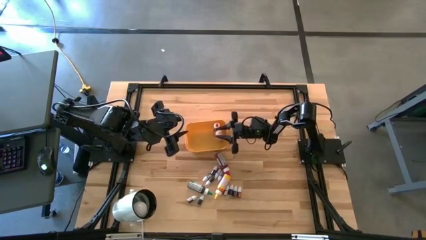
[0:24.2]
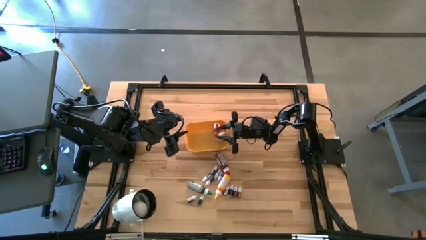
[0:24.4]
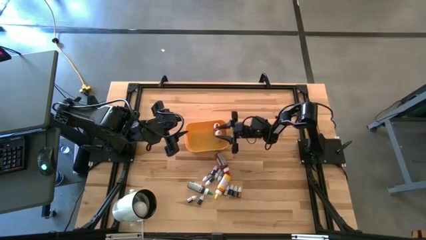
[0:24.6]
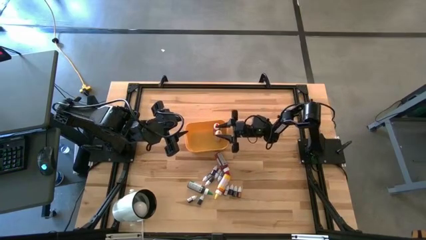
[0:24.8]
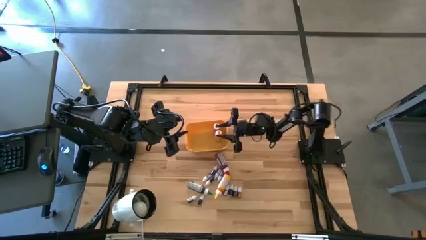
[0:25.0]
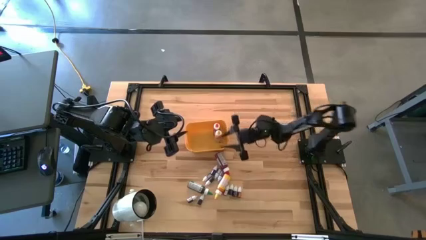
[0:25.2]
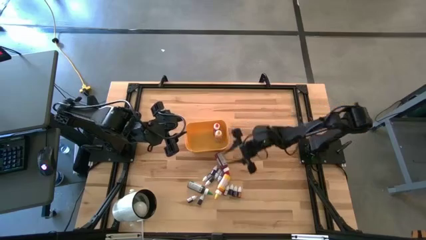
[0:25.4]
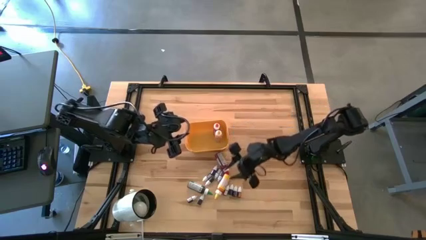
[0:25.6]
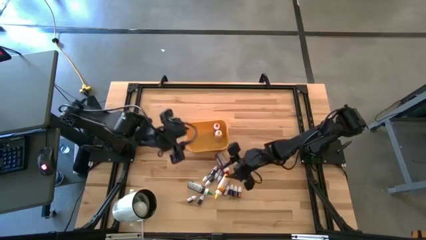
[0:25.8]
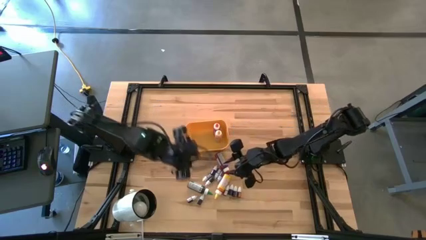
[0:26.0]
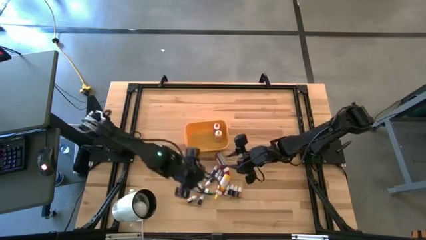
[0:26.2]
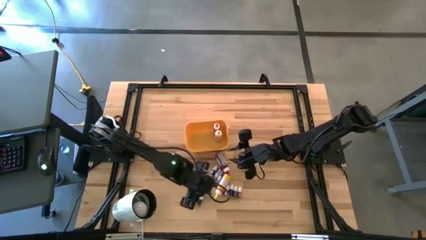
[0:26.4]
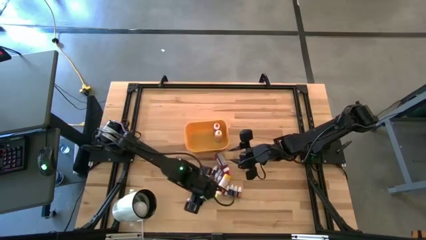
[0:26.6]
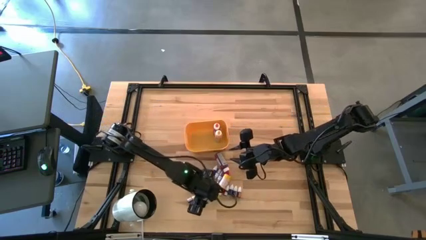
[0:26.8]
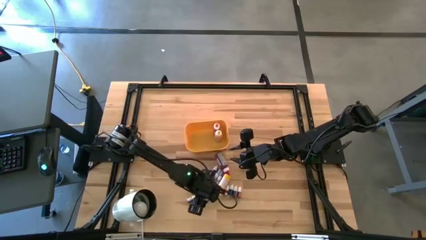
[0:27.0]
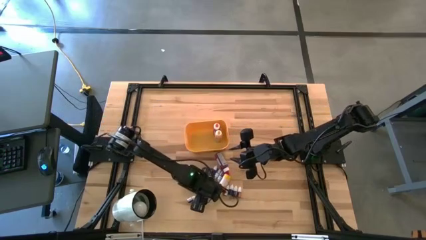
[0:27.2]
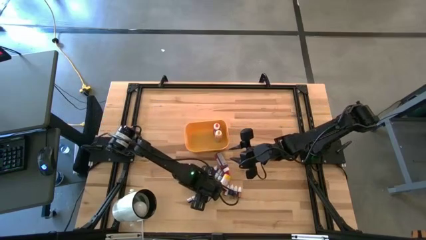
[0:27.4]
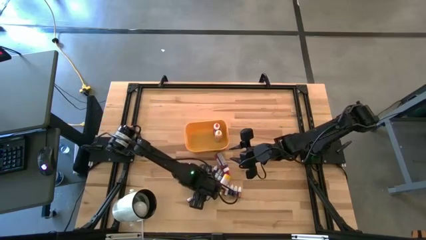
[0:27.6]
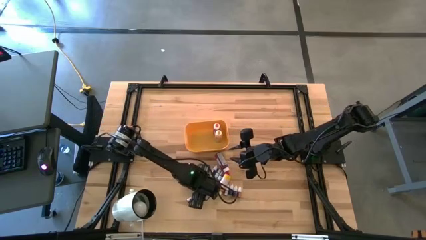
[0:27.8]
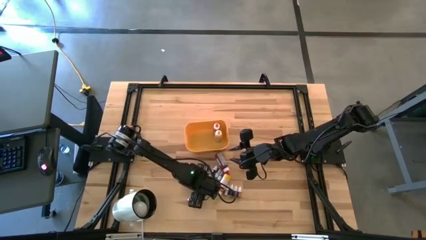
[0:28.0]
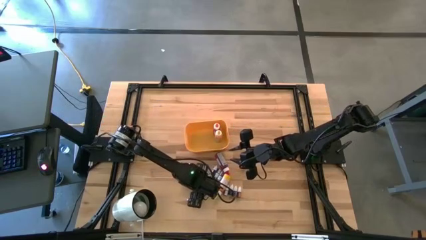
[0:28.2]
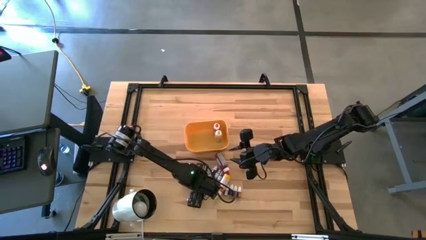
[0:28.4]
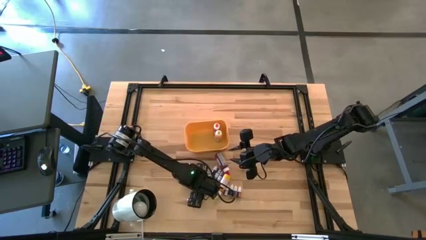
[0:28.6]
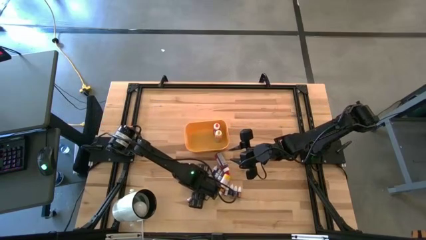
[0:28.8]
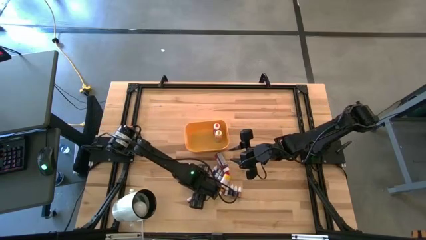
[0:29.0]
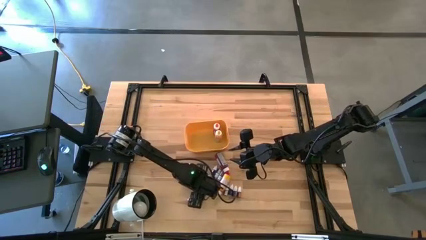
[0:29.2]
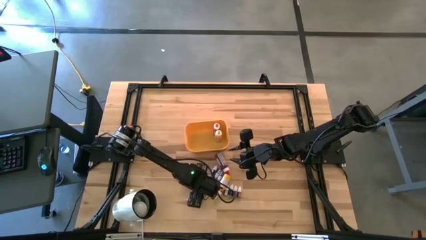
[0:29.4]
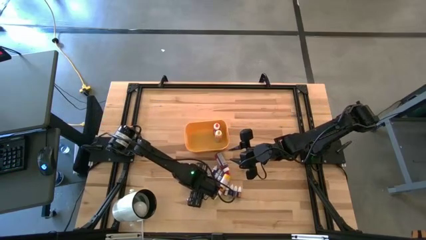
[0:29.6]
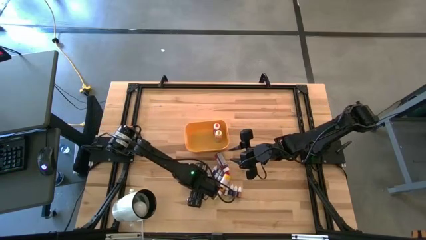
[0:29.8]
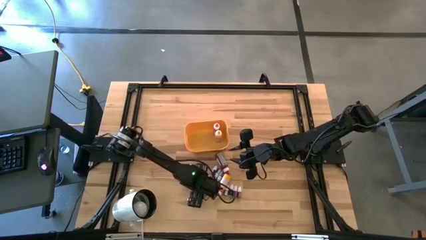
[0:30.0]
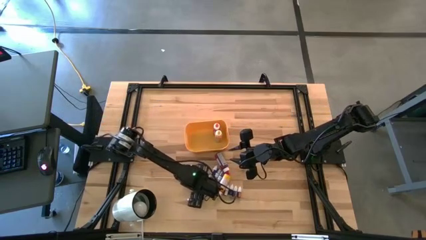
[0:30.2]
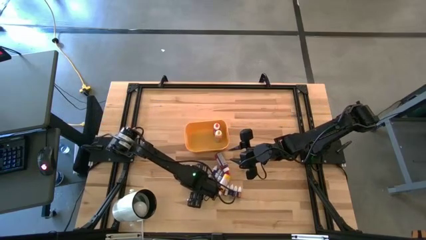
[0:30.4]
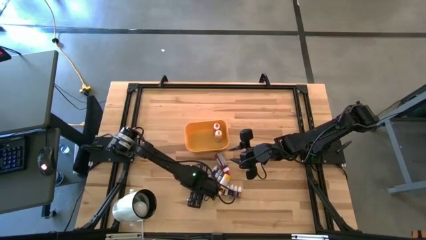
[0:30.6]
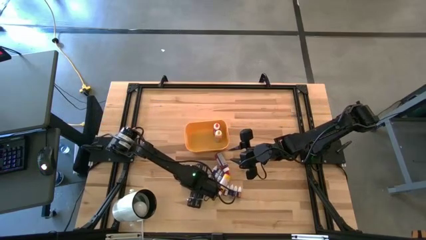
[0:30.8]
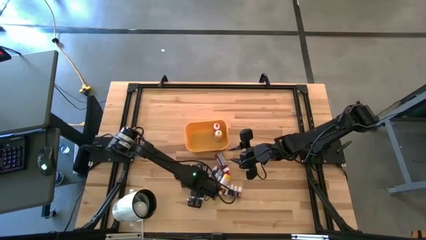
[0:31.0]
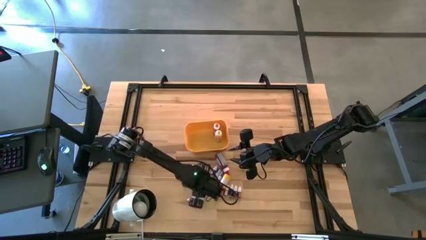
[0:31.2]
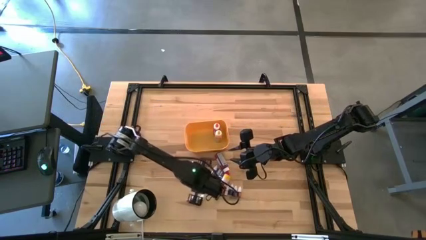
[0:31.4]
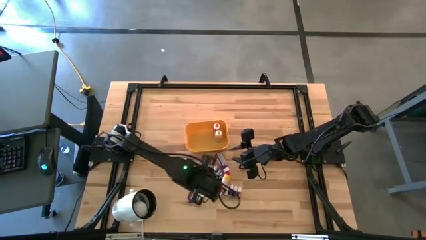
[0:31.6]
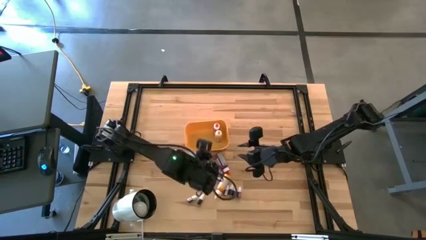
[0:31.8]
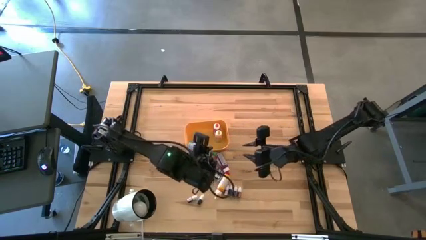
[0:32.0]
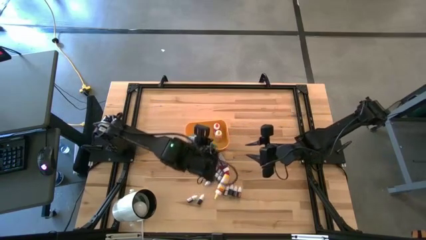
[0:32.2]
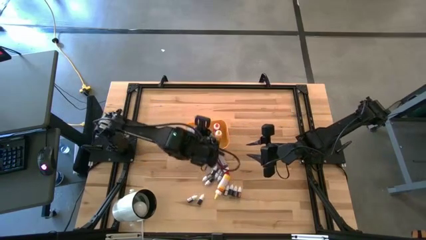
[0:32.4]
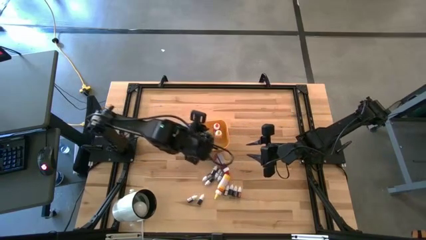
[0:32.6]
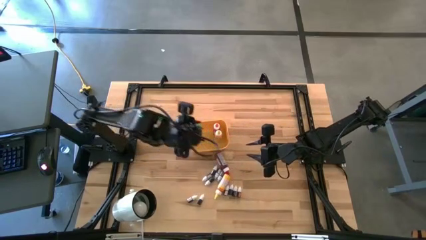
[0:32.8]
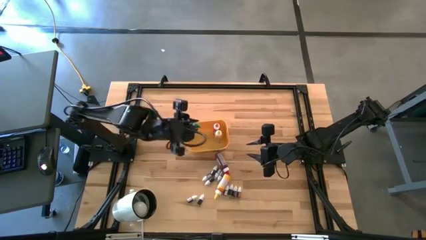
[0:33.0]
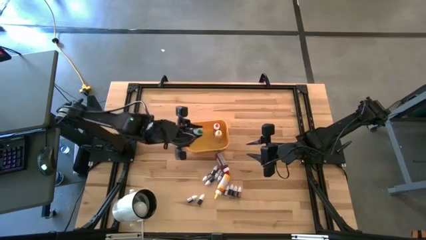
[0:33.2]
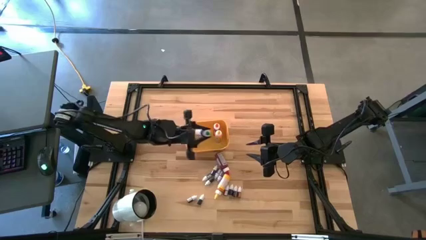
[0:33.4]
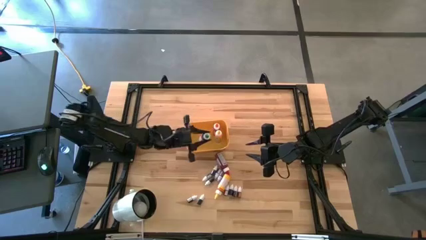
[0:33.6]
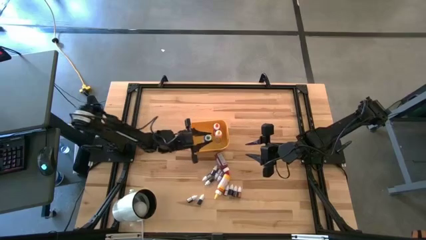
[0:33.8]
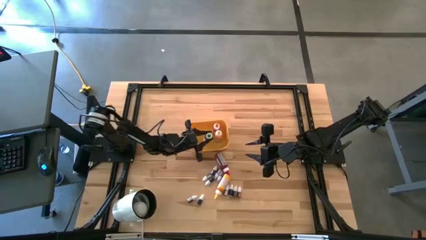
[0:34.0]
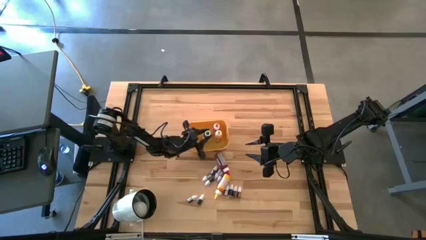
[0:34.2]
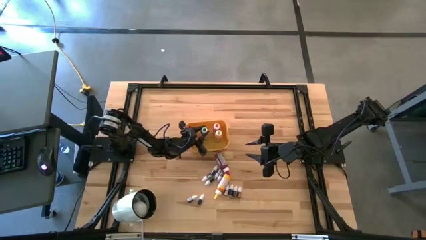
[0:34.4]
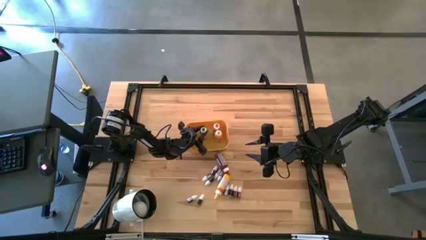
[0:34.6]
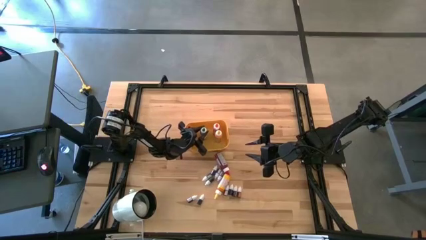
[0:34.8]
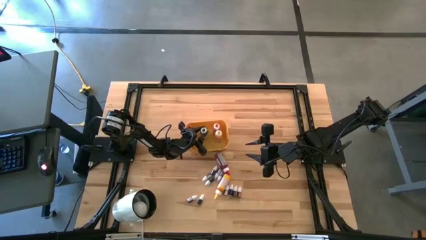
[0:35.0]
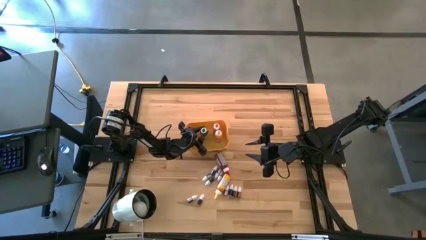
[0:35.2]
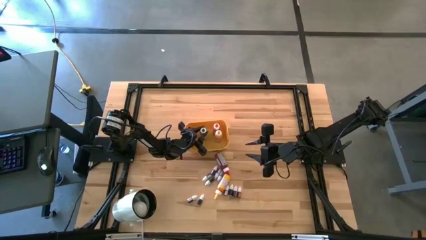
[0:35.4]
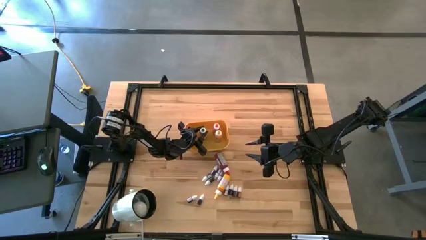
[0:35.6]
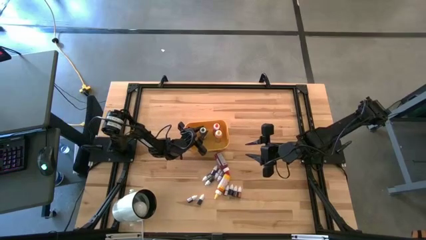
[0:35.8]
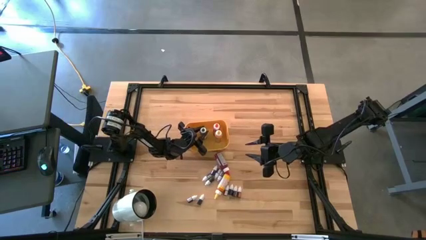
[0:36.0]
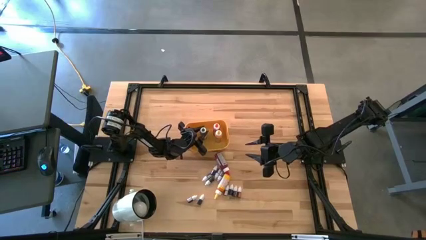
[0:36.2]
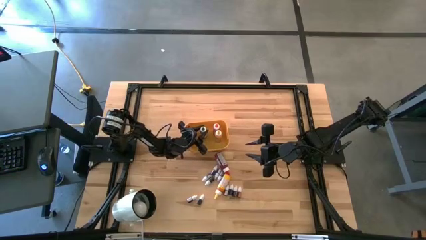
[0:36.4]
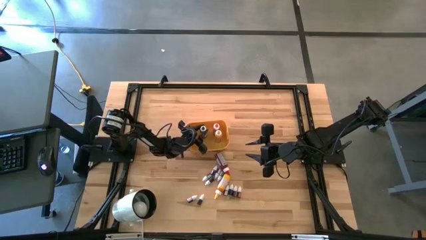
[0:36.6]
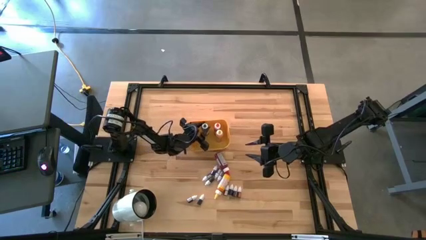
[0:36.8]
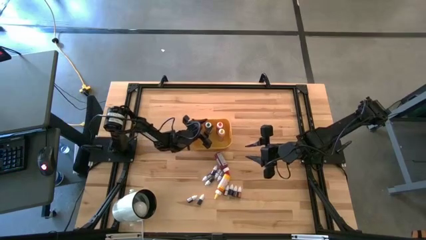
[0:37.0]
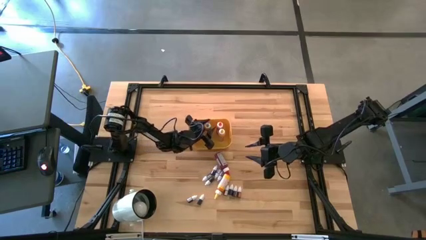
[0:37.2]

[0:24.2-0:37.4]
Task: Pick & Place food coloring
Put the large green food coloring bottle into the yellow bin

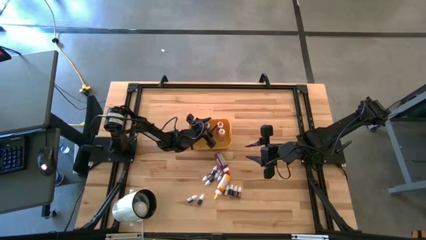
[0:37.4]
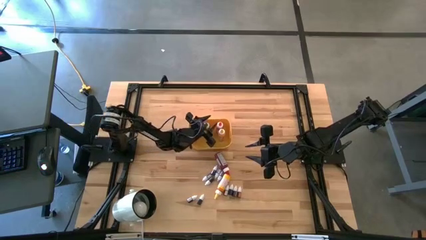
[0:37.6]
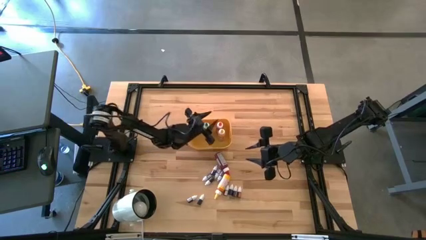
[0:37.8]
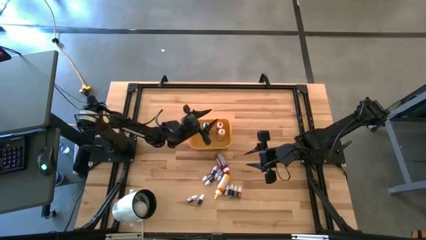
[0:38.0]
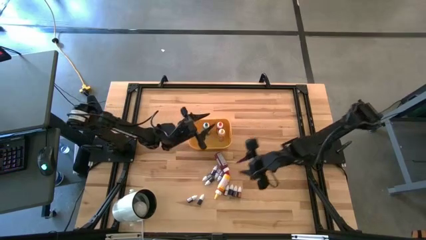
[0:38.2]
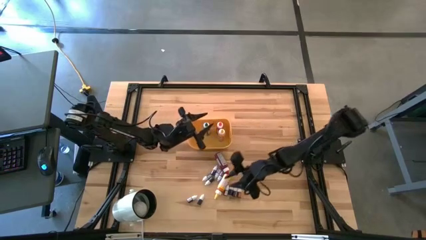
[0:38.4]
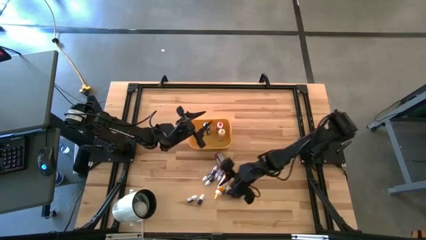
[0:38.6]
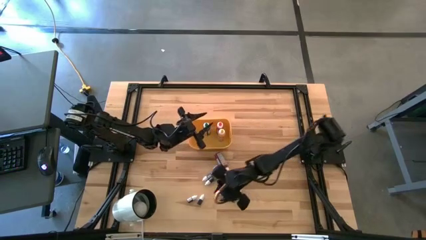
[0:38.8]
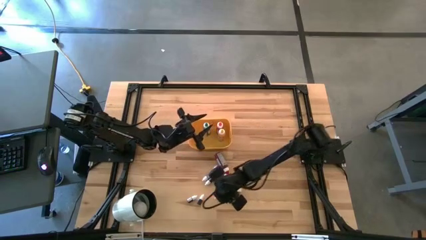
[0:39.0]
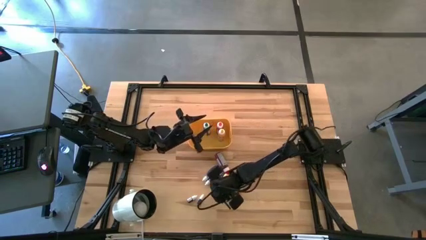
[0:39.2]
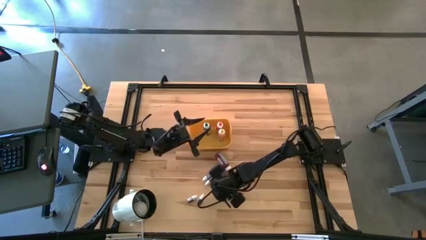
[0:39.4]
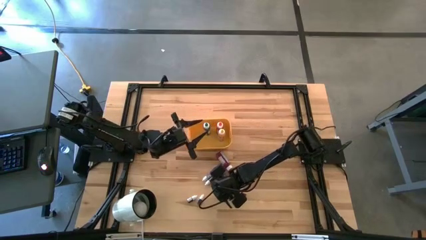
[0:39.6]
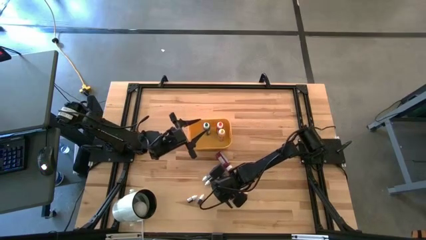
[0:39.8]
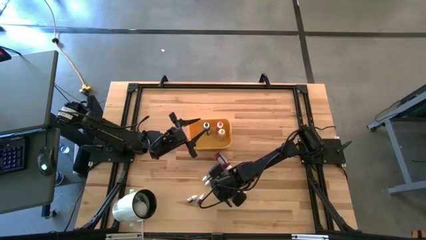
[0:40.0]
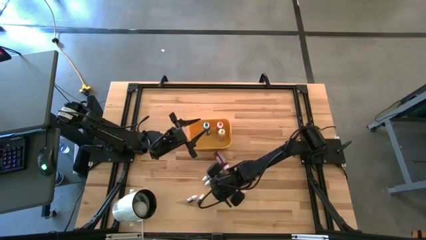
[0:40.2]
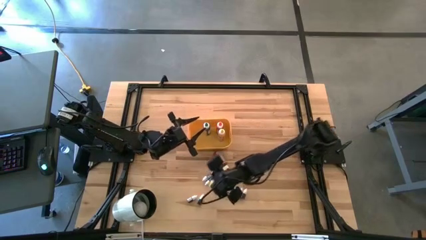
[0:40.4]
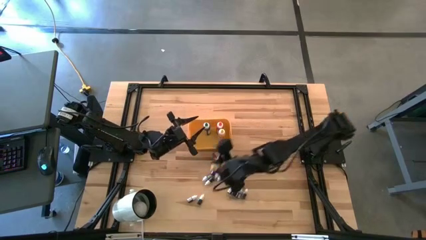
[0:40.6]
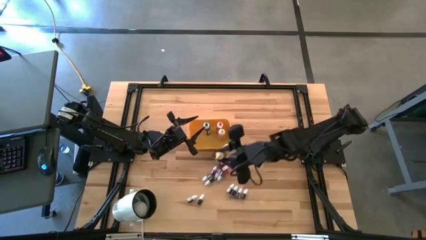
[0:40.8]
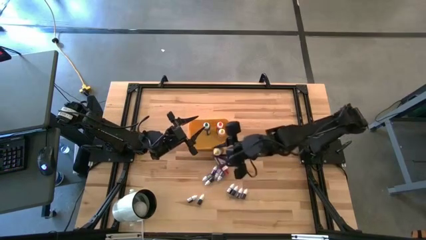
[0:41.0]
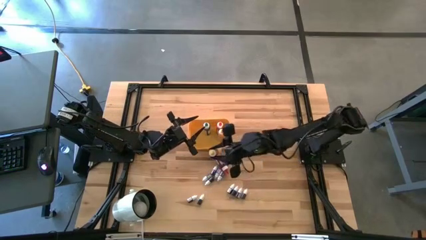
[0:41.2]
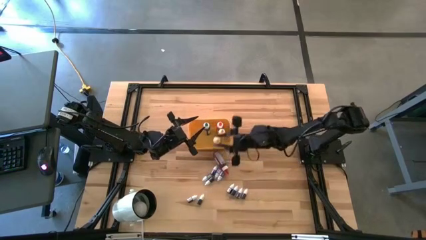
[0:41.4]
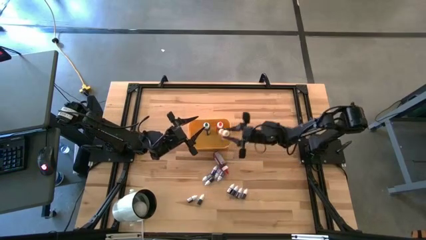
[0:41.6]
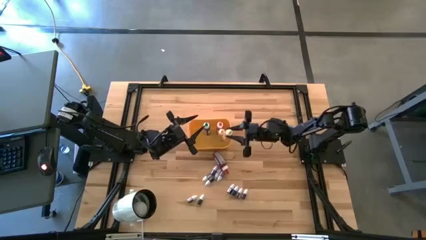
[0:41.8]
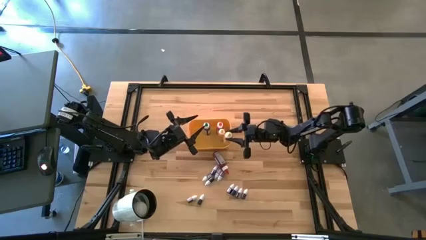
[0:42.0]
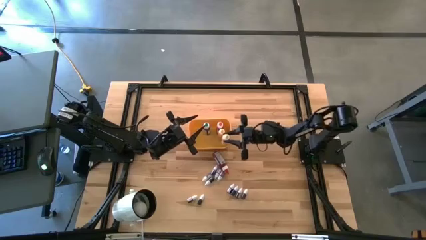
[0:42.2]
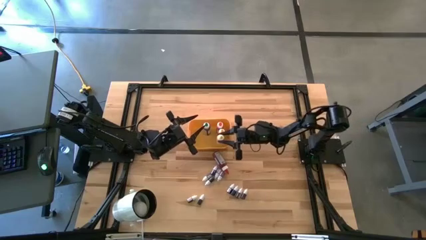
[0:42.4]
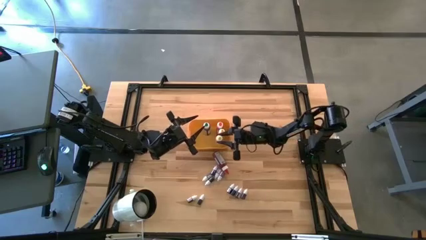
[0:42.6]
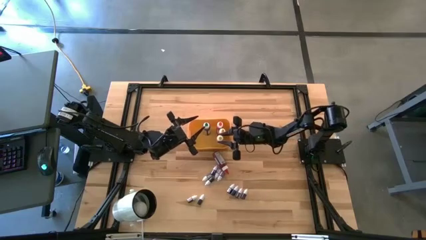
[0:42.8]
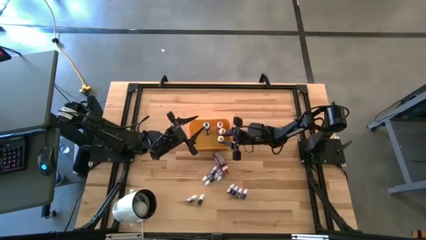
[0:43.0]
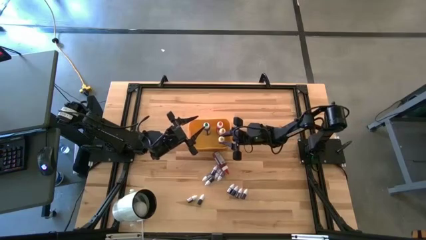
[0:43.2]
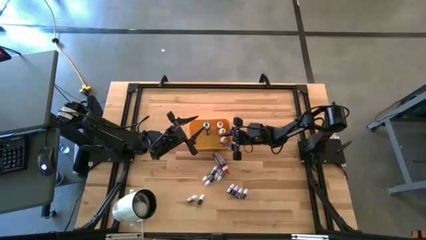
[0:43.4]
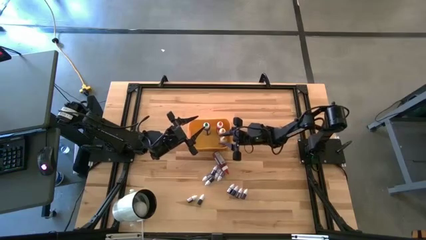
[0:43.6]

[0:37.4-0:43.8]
Put the large yellow food coloring bottle into the yellow bin
